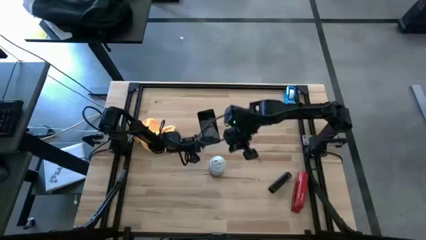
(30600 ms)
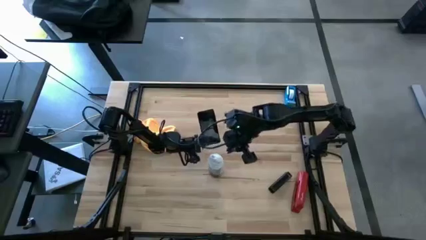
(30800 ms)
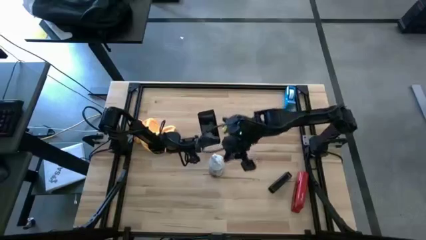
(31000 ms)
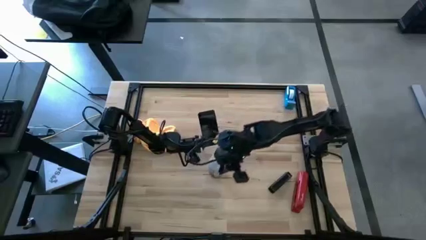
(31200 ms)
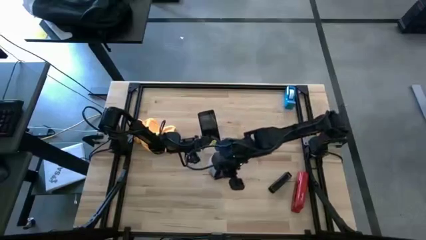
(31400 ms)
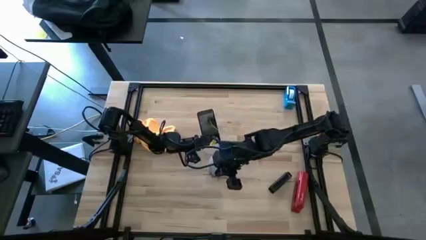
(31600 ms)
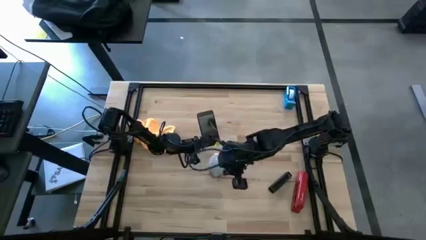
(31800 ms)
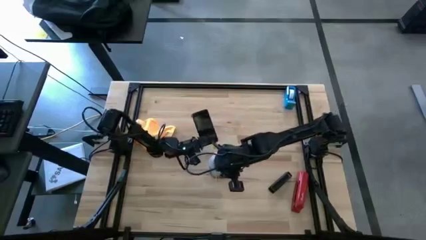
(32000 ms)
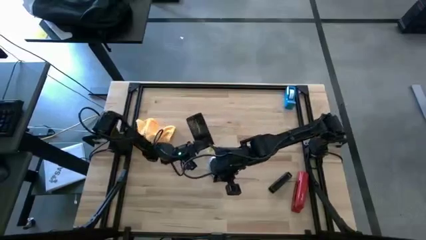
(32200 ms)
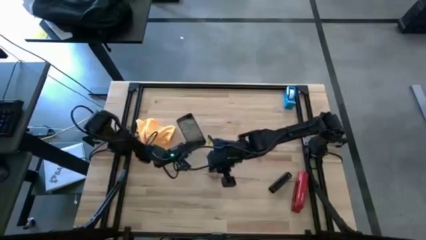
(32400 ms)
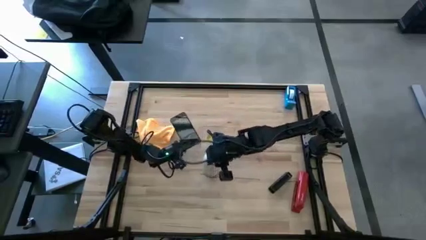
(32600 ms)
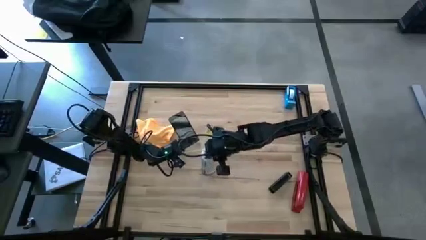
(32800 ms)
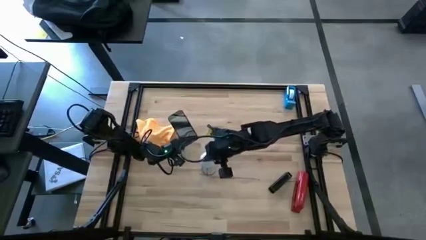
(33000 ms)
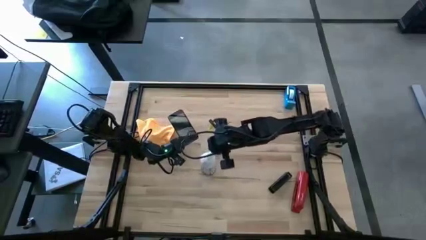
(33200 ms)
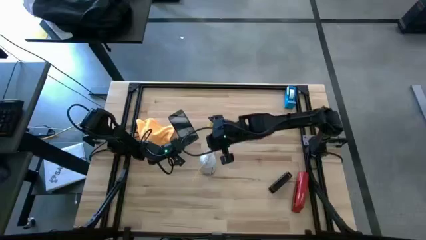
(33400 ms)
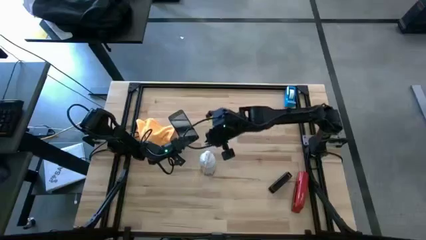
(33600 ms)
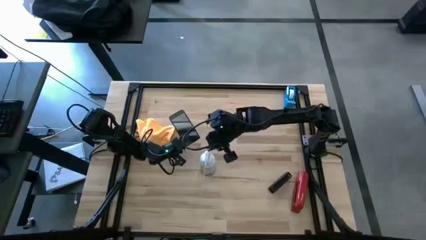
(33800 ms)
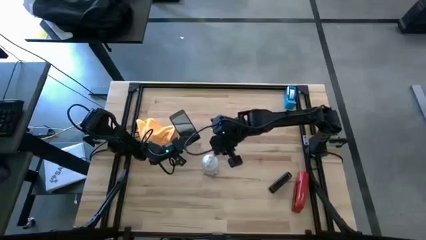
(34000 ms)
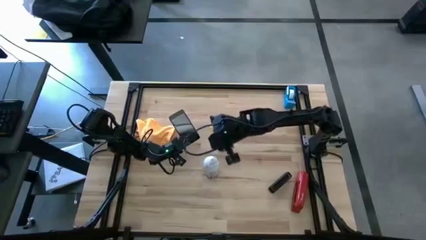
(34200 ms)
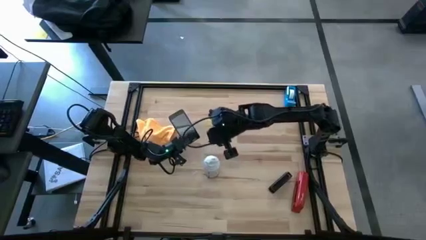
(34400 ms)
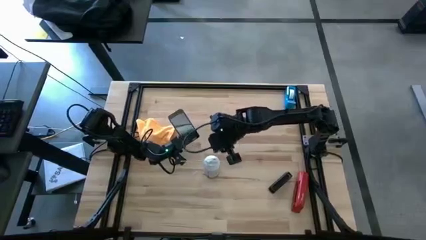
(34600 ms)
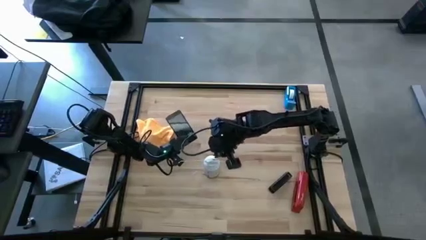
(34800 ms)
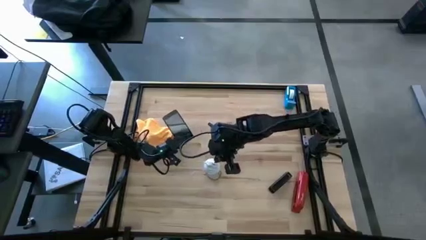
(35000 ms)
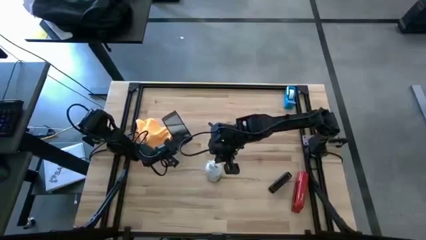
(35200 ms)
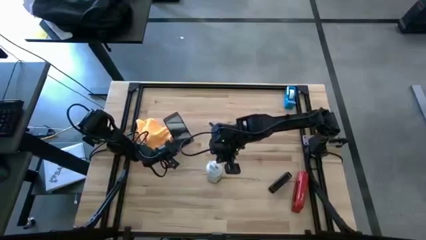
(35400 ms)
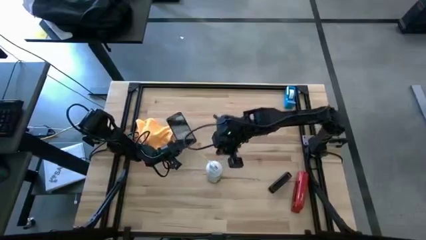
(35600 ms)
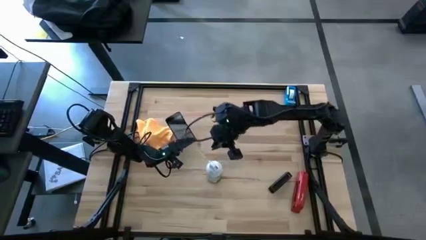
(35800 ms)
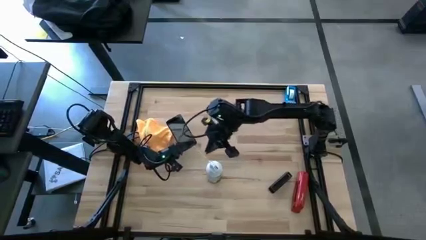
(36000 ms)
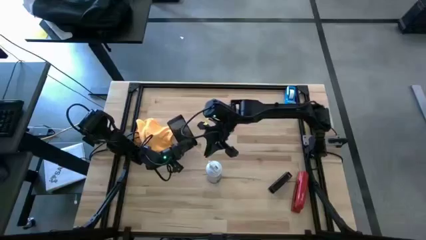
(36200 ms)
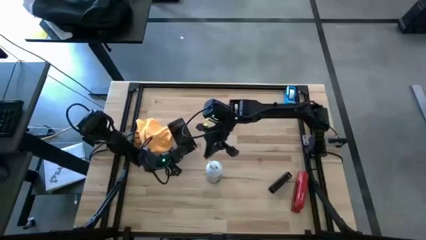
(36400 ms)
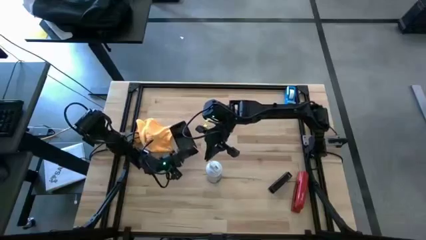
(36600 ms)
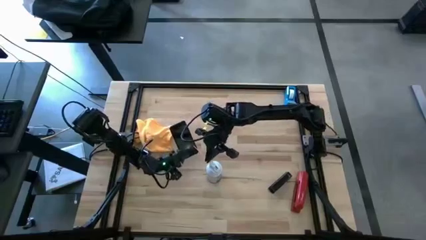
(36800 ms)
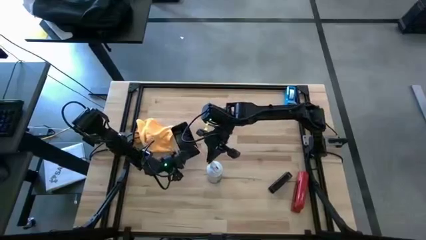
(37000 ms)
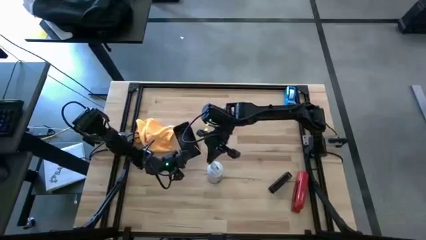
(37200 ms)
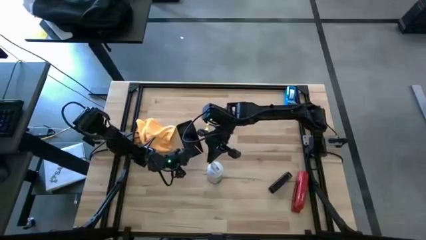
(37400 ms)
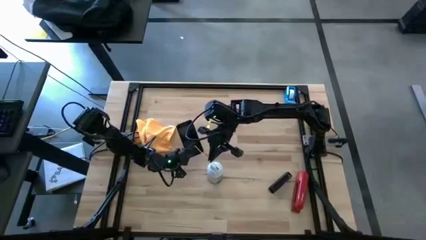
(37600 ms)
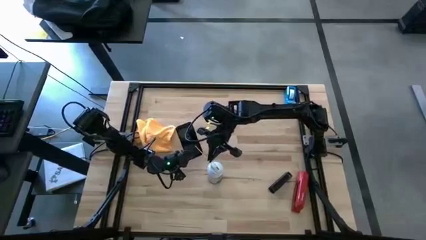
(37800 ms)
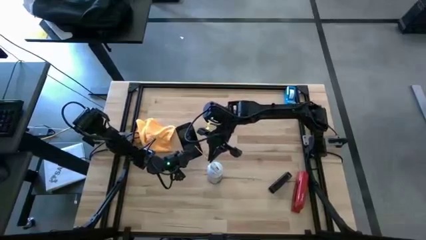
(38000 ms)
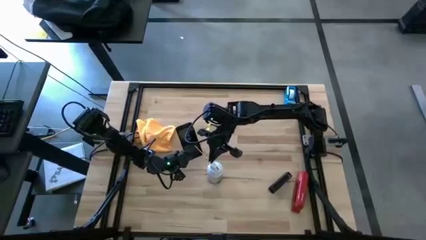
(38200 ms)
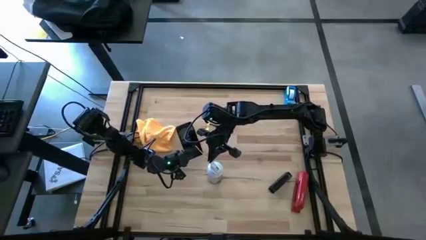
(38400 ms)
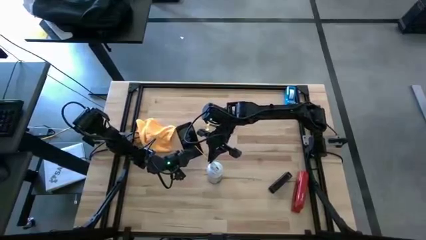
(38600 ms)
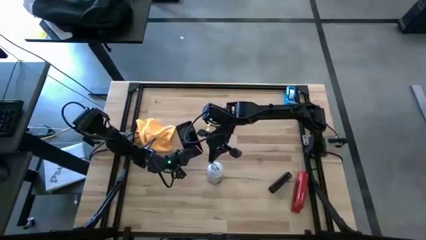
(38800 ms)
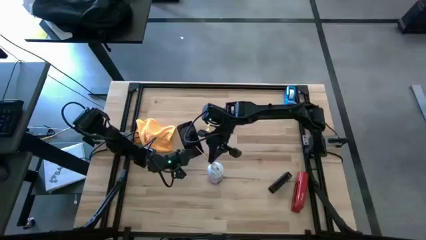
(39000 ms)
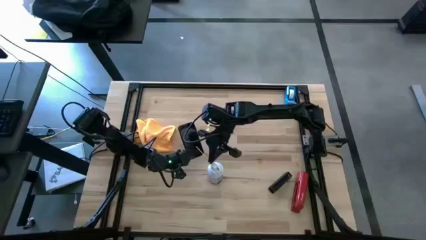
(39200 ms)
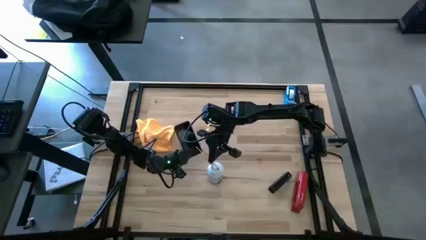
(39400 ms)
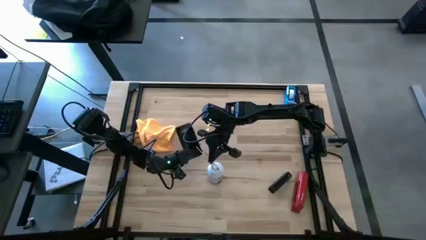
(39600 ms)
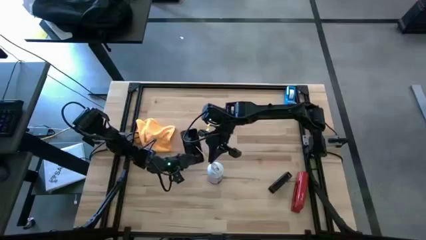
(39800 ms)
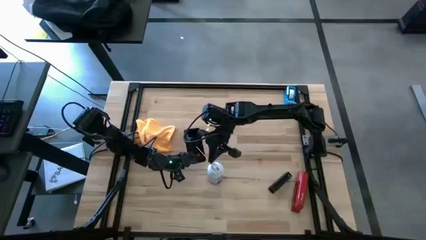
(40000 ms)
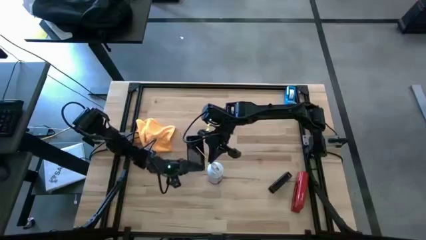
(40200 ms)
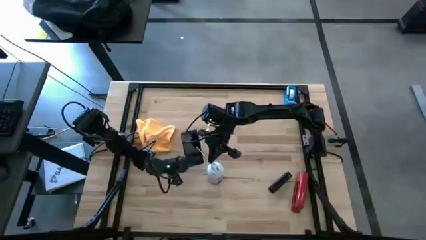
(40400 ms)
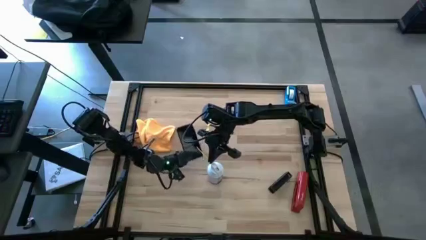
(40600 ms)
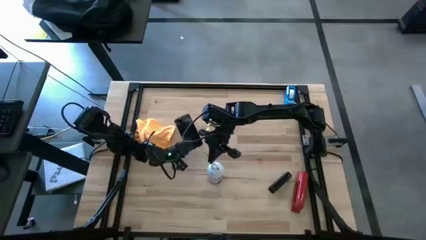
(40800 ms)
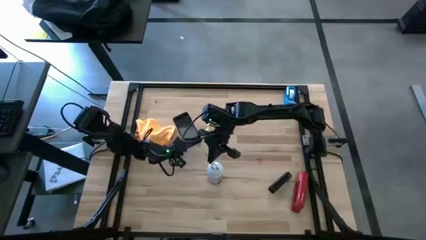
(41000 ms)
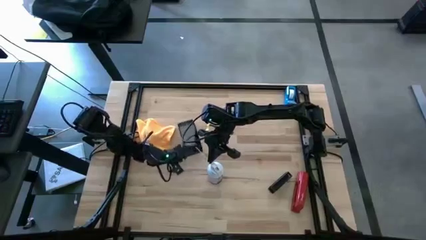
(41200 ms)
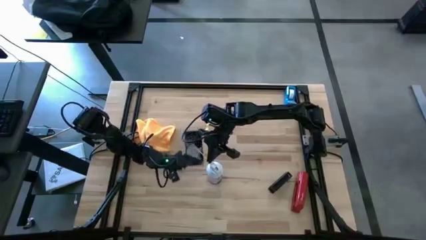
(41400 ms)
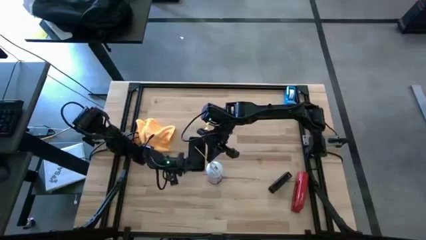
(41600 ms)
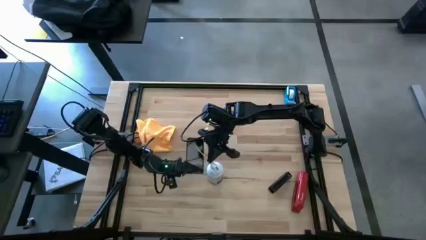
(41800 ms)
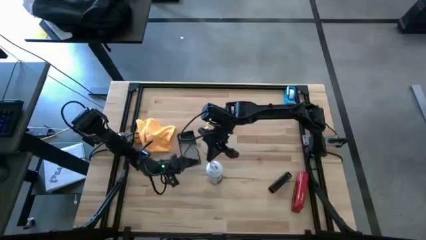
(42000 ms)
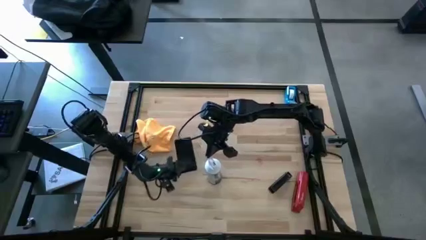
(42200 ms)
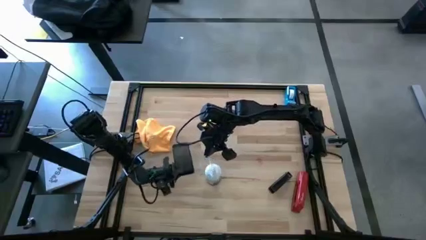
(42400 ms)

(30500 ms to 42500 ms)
Task: Apply microfiber cloth
Spray the front of the cellphone using the white spray bottle
